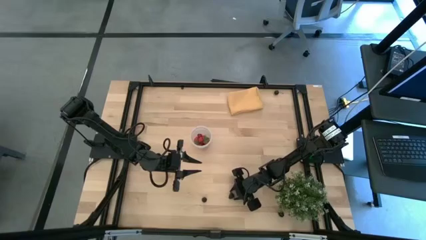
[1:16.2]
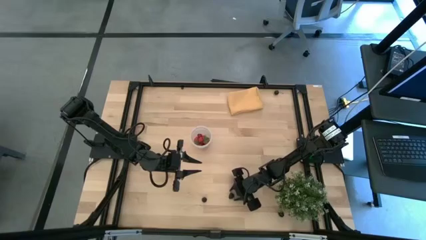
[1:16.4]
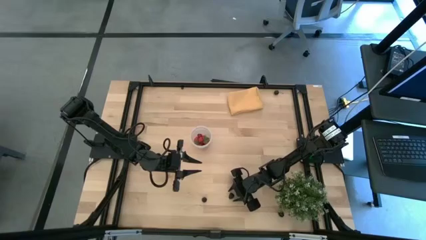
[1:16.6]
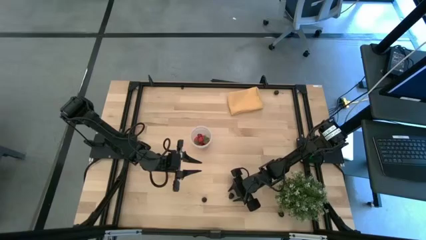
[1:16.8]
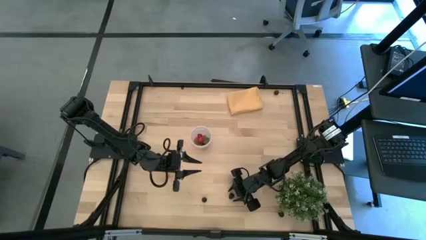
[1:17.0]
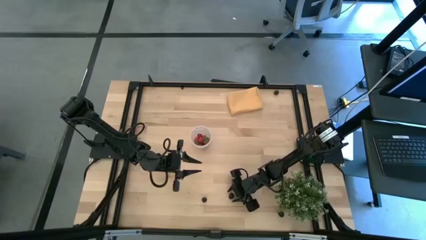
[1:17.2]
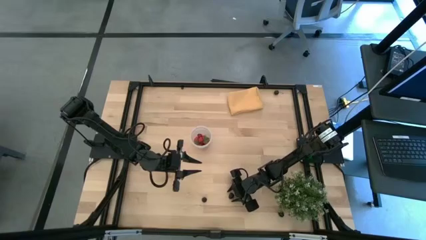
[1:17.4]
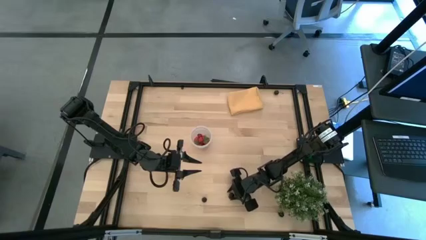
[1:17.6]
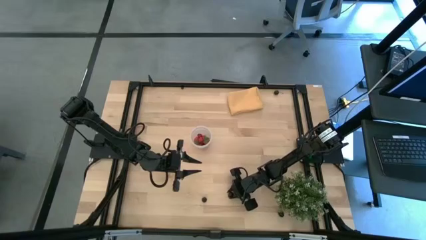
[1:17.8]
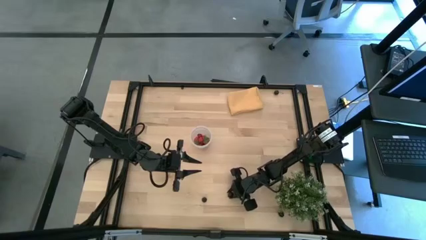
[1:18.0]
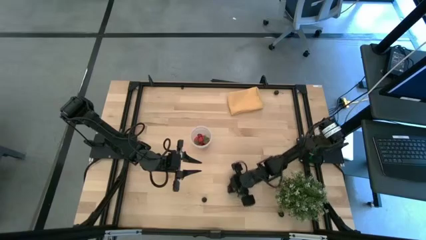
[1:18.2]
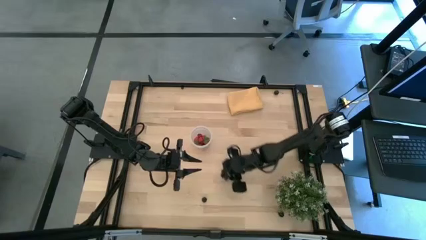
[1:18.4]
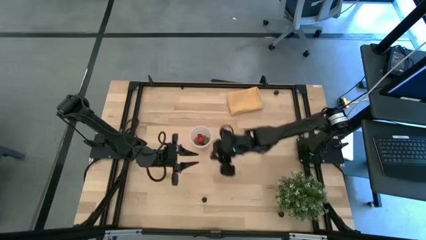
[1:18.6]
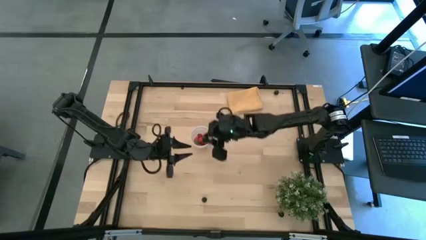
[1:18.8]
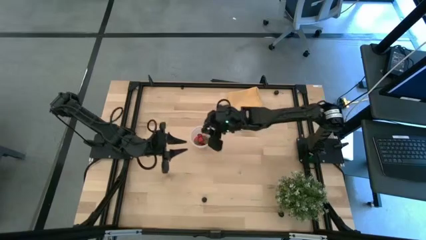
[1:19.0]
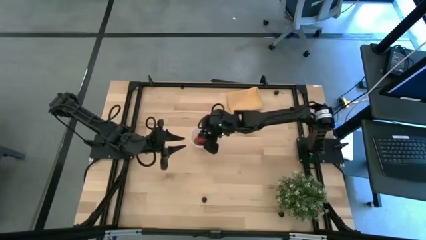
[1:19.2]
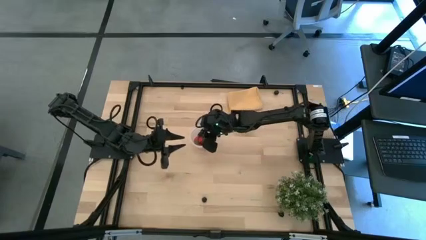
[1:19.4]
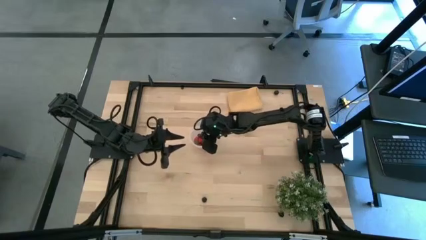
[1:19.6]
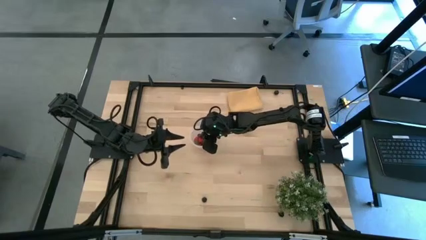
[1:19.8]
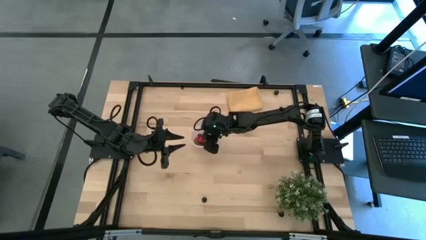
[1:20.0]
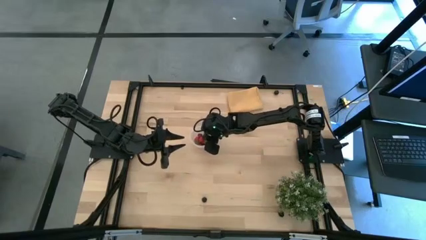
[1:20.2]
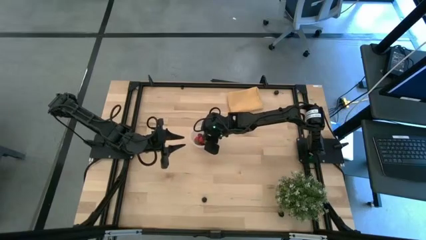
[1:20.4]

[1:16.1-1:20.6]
Task: Pick and placing Produce into tupperware
Put the right black raspberry into the transparent container

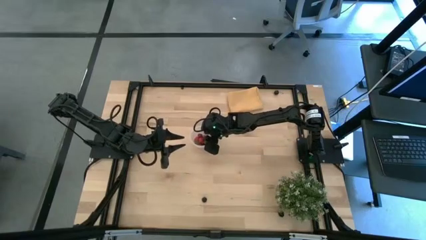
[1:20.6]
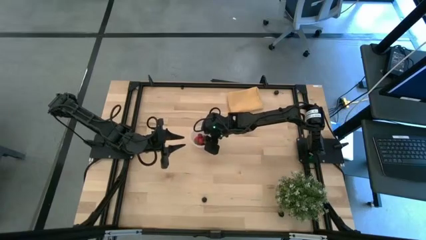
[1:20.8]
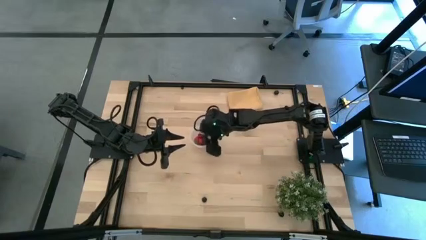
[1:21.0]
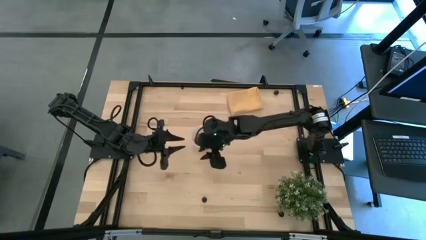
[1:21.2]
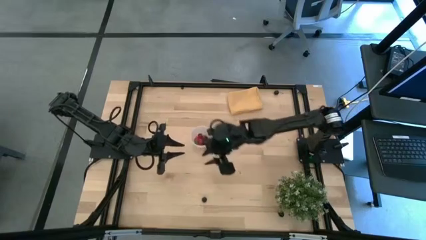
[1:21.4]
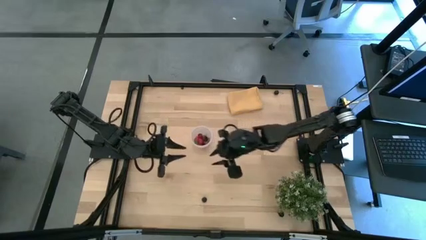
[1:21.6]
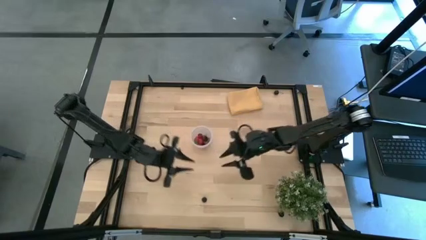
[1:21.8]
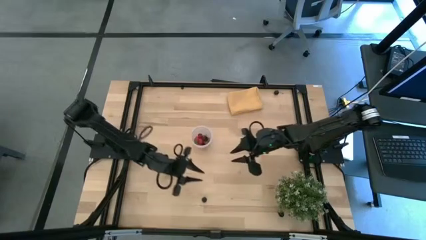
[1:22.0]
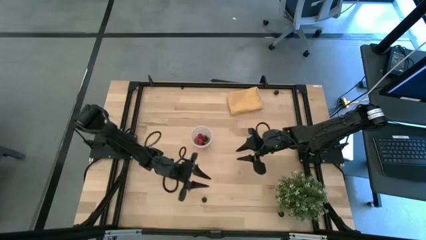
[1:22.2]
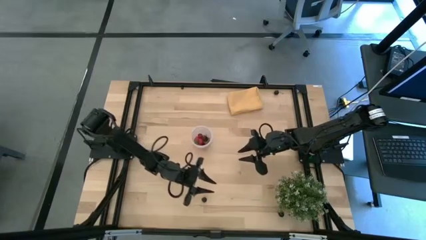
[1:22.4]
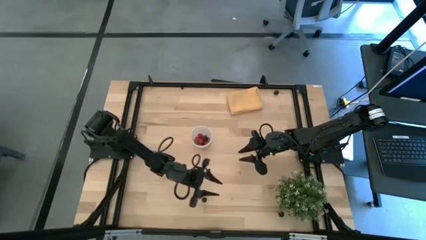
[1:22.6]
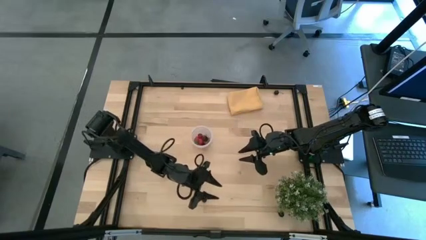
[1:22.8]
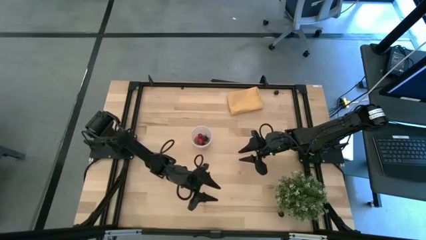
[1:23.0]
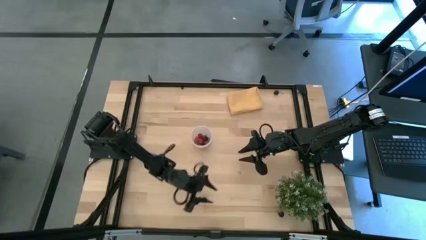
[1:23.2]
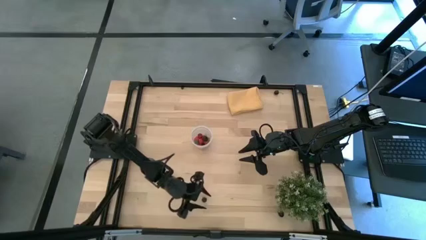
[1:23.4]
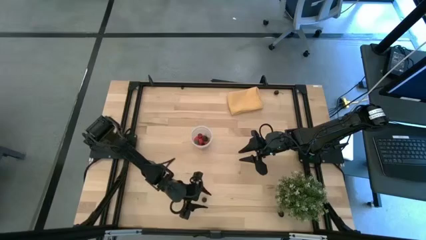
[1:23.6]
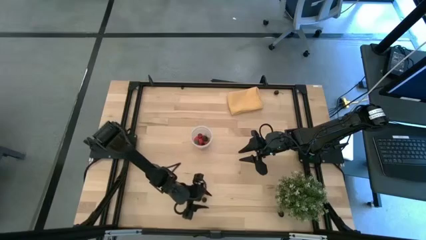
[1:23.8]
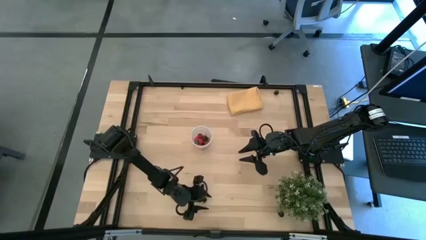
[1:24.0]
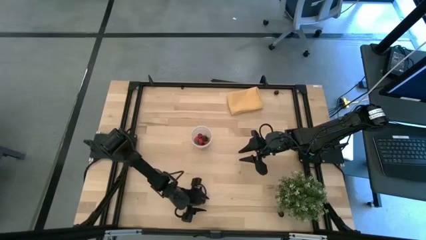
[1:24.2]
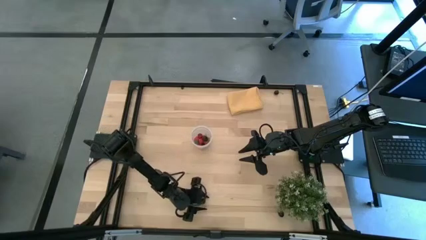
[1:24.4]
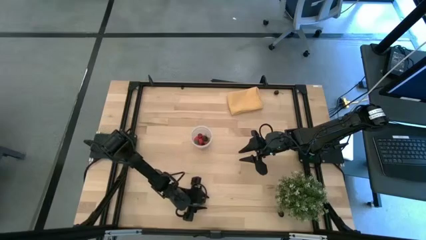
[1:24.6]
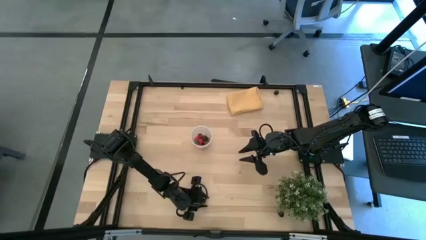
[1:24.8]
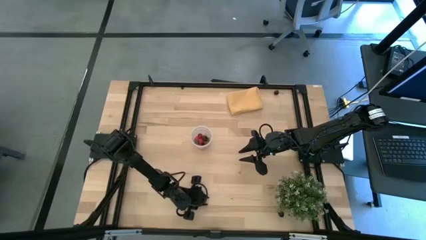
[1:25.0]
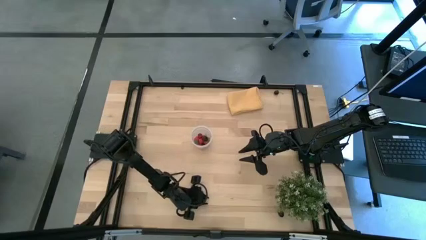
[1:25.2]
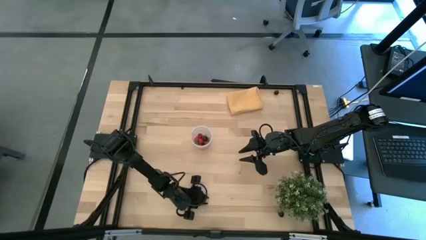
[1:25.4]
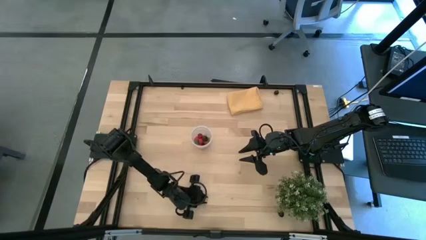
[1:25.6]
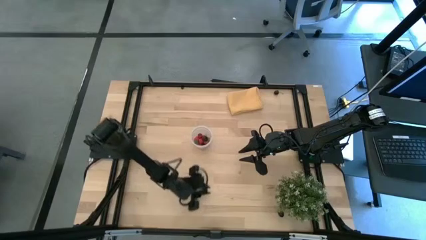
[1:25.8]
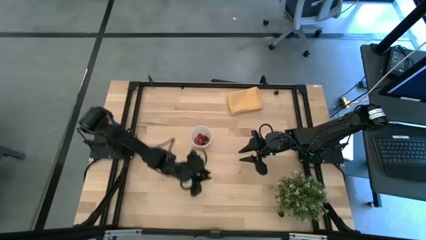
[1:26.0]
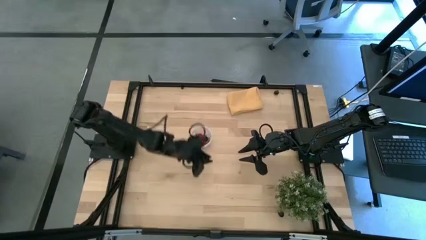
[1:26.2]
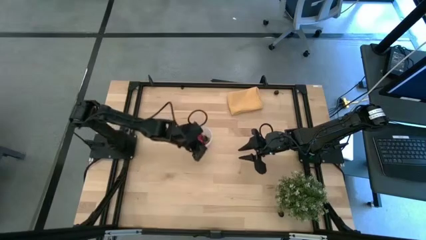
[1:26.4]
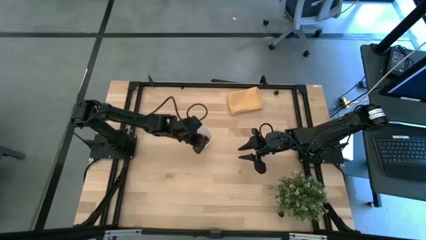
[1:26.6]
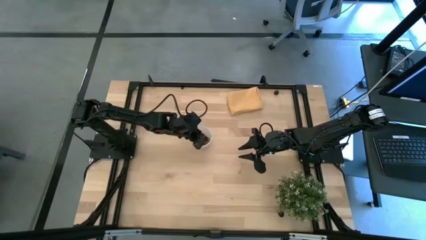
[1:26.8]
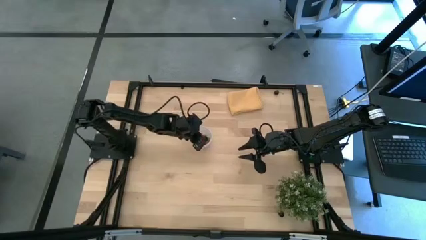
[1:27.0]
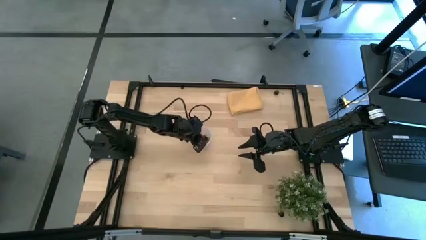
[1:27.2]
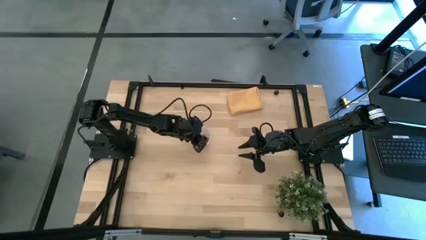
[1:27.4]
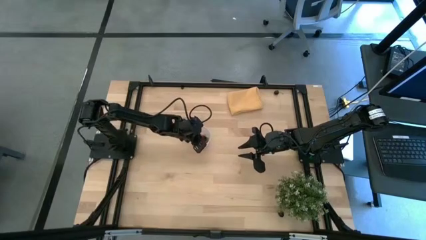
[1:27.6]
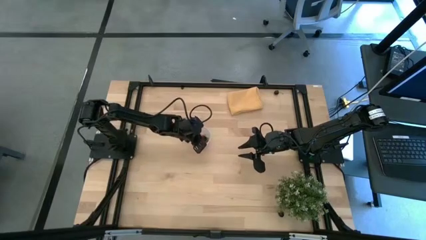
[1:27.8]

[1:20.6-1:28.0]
Put the black raspberry into the transparent container

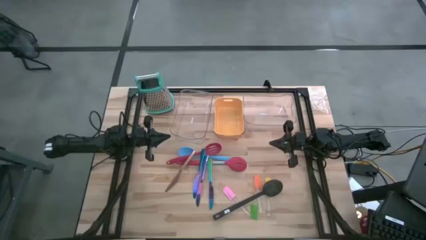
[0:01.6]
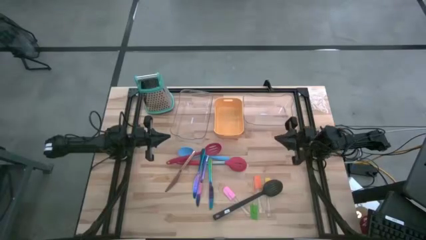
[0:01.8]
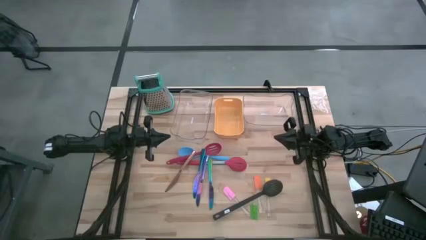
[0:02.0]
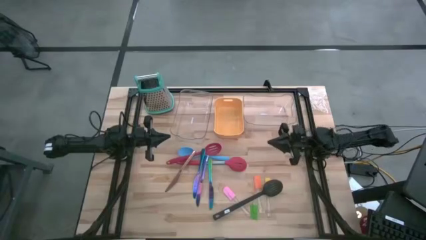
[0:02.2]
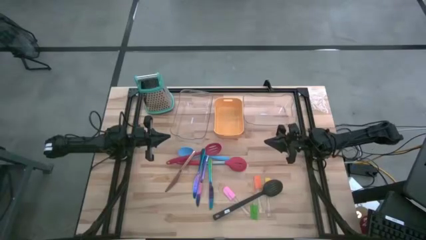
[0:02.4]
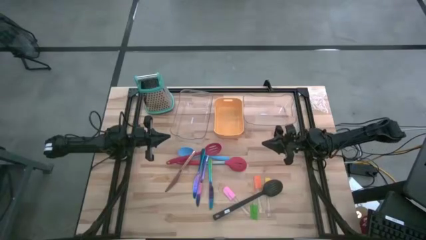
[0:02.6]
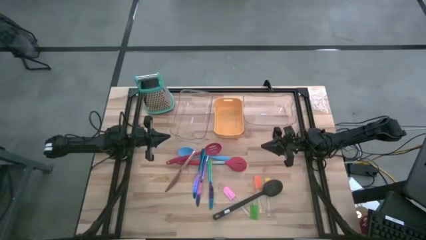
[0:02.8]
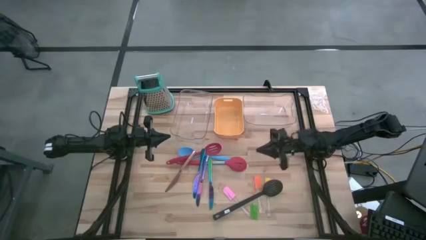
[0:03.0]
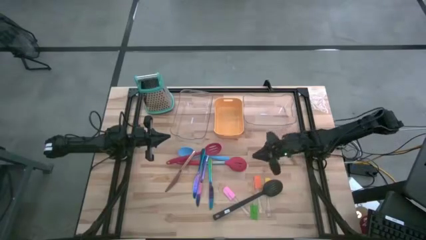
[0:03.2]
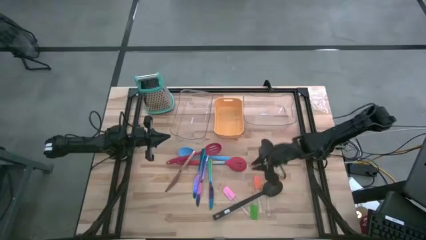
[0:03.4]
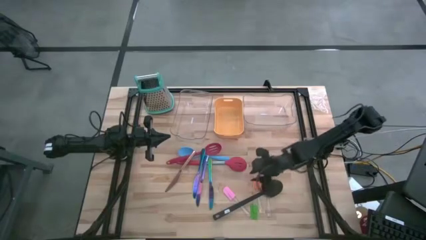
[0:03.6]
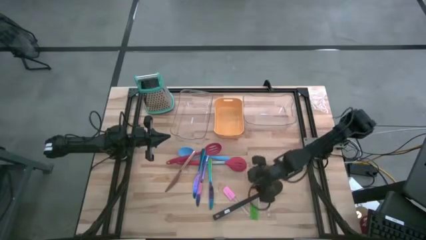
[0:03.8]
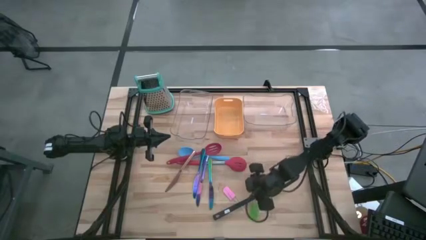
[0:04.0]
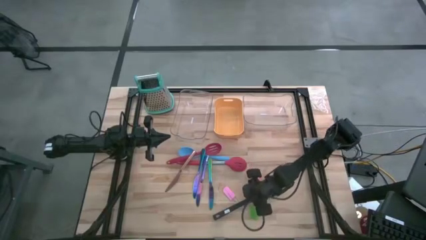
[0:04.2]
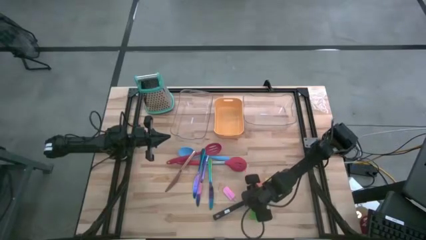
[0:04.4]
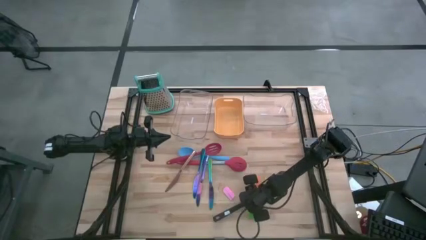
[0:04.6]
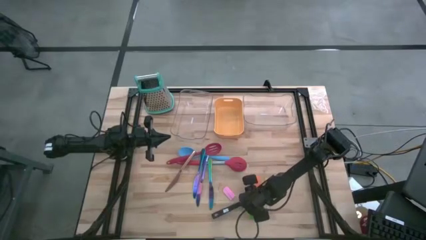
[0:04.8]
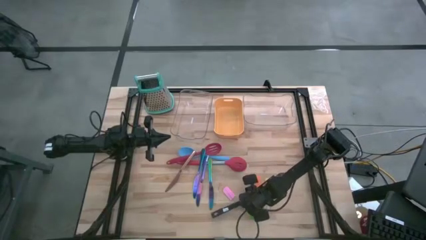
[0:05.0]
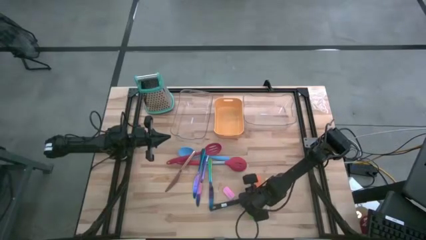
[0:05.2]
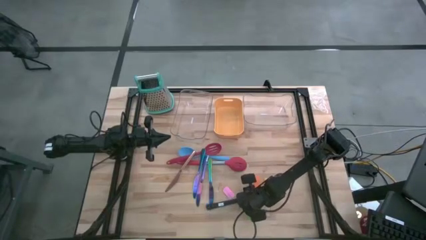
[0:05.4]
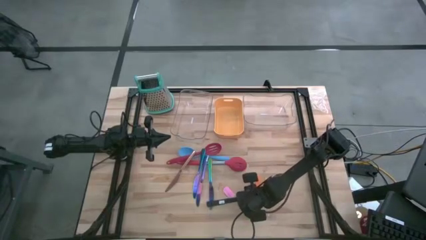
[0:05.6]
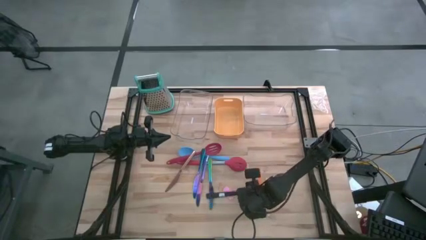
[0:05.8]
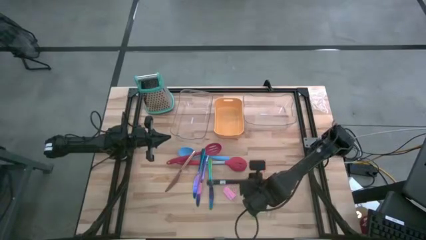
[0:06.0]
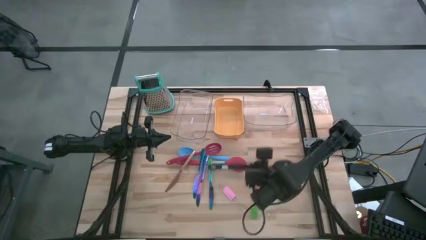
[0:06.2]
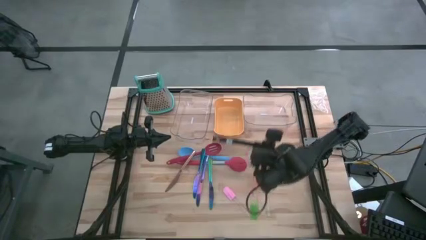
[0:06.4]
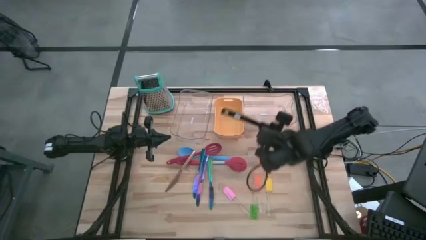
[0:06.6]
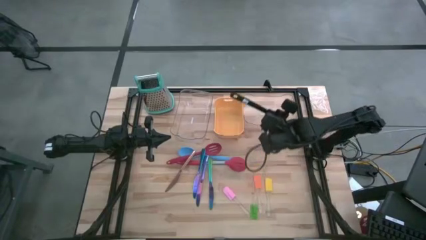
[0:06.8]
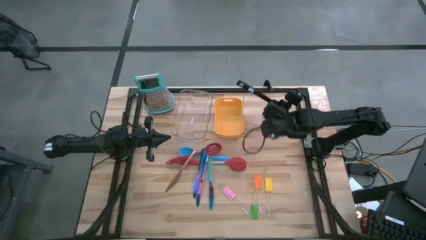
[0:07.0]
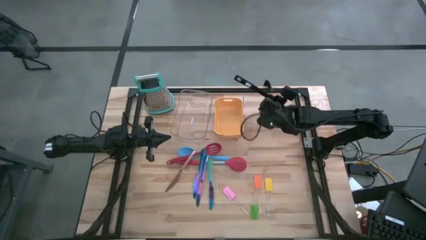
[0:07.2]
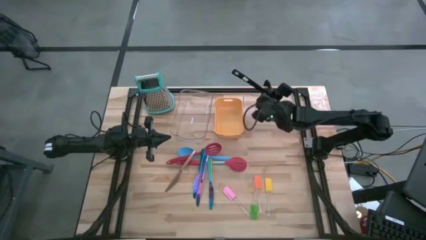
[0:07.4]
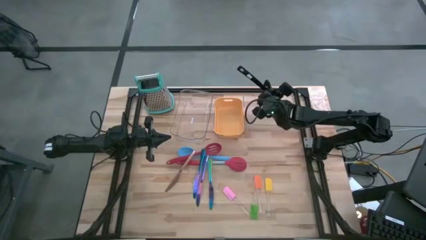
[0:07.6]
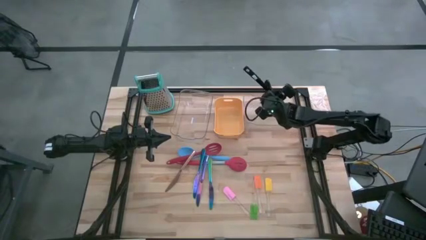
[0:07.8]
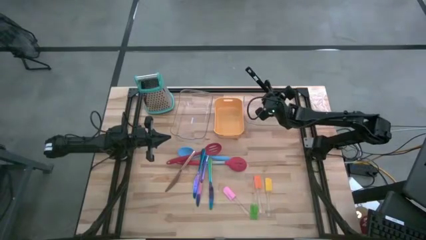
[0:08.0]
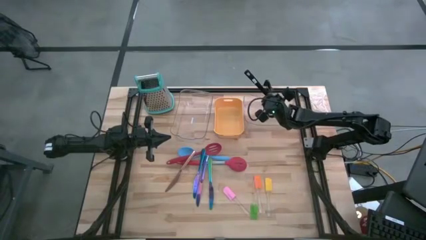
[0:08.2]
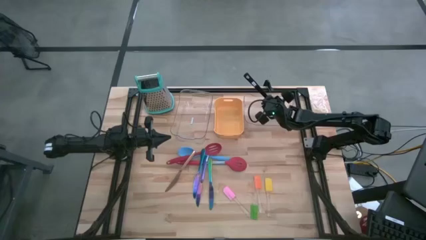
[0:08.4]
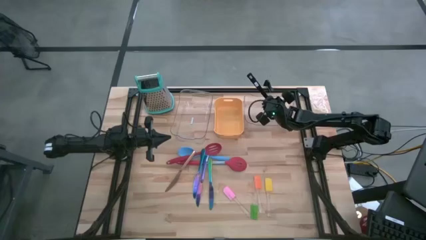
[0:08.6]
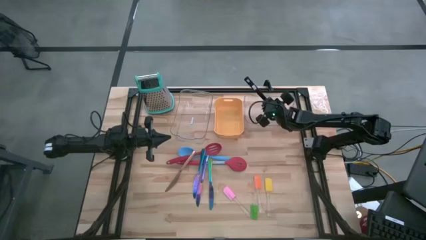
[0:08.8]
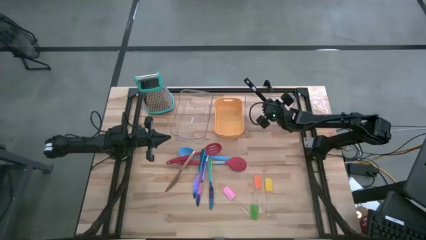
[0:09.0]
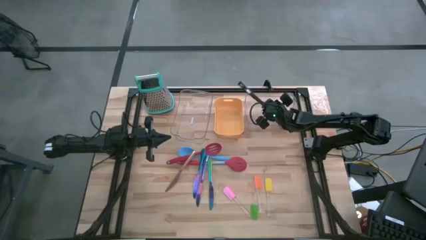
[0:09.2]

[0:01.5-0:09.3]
Task: Pick & Place Kitchen Items
Put the black slotted serving spoon into the right transparent bin
